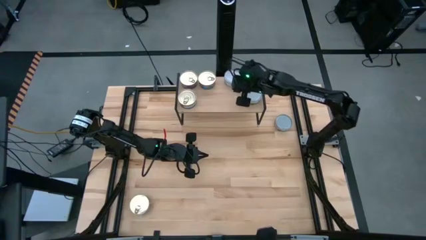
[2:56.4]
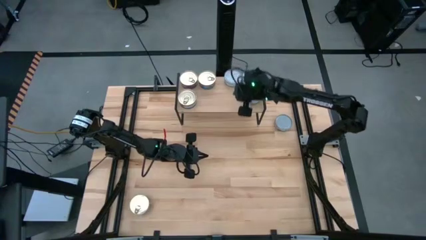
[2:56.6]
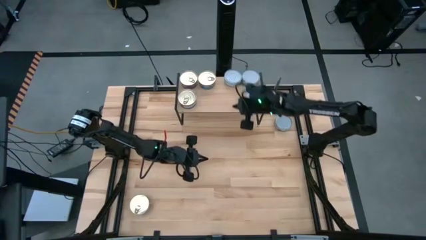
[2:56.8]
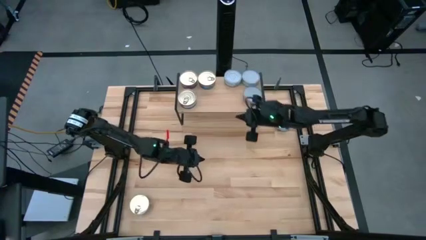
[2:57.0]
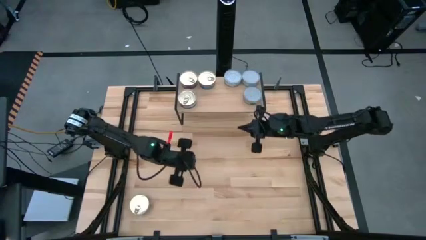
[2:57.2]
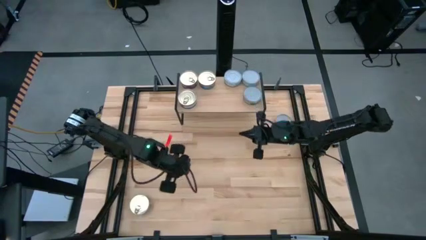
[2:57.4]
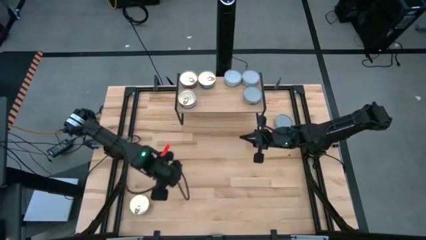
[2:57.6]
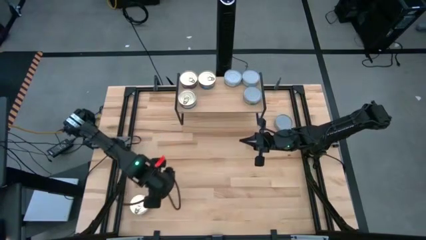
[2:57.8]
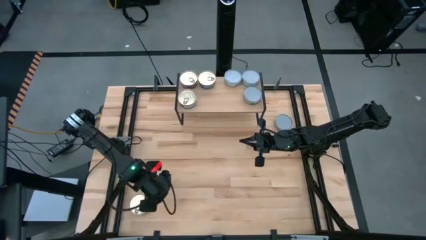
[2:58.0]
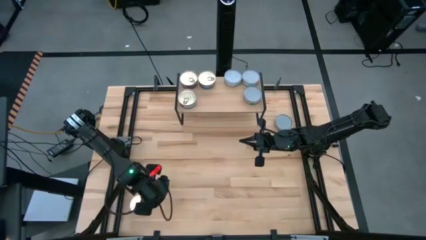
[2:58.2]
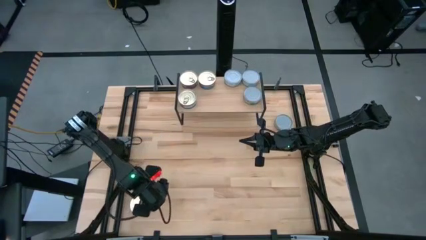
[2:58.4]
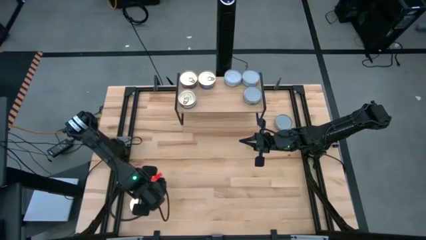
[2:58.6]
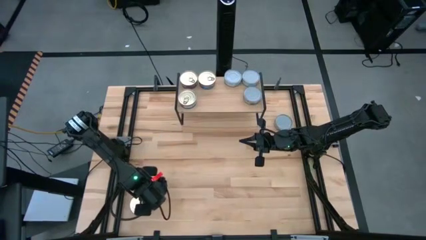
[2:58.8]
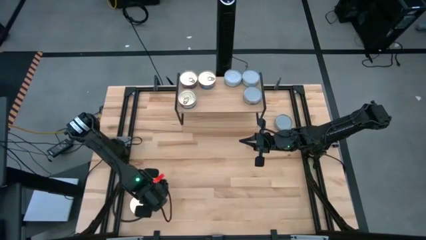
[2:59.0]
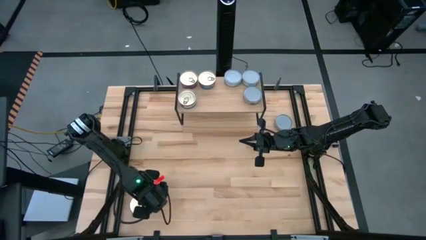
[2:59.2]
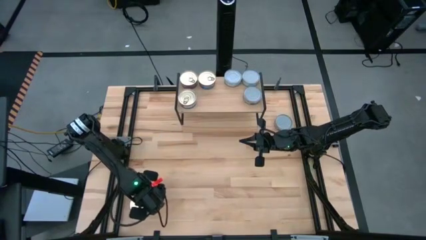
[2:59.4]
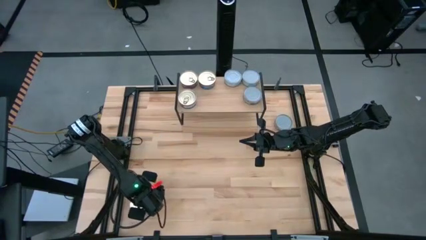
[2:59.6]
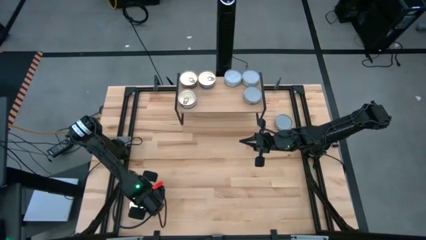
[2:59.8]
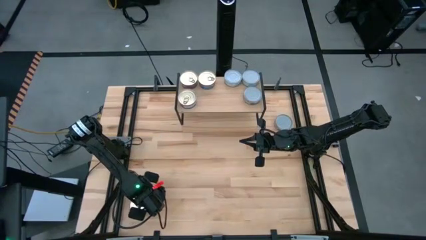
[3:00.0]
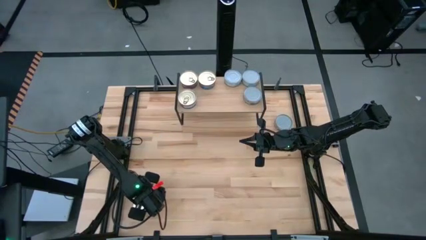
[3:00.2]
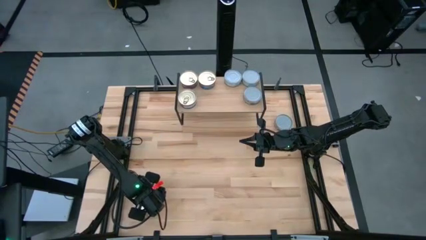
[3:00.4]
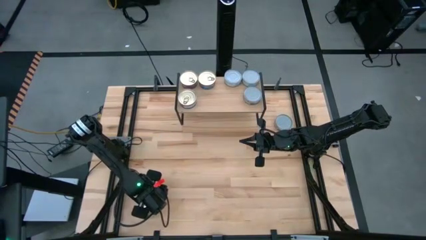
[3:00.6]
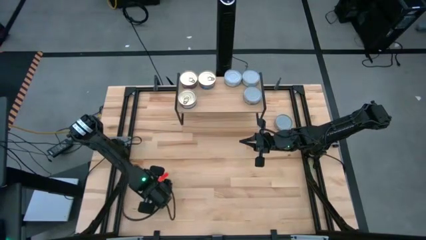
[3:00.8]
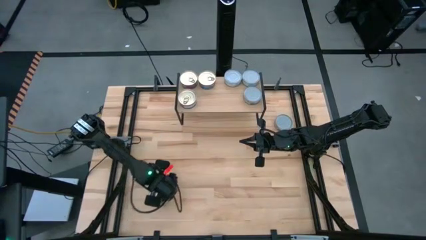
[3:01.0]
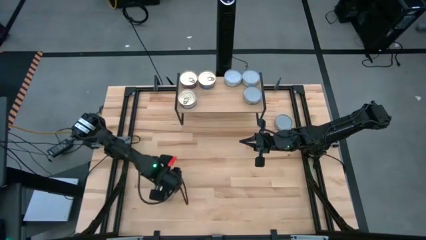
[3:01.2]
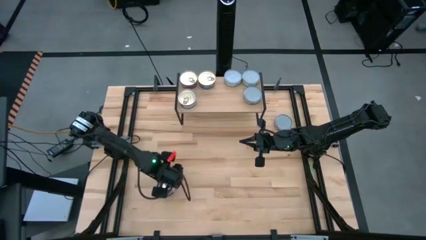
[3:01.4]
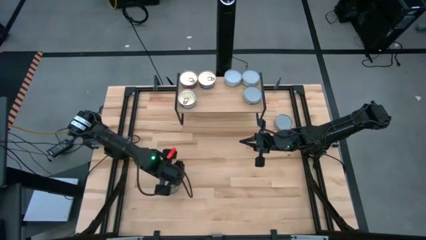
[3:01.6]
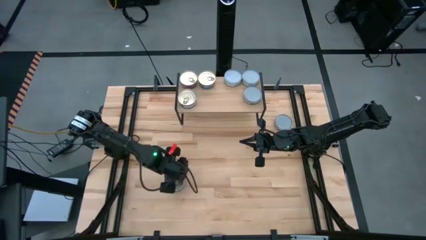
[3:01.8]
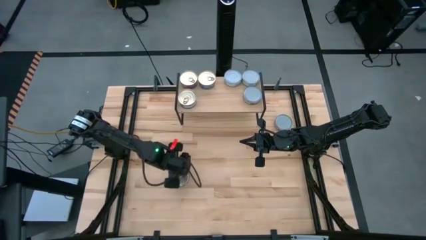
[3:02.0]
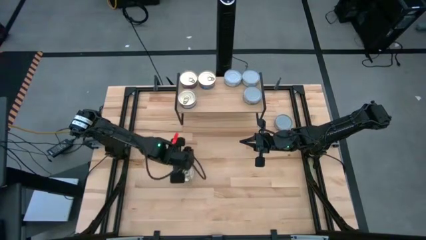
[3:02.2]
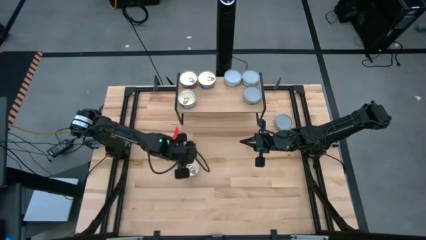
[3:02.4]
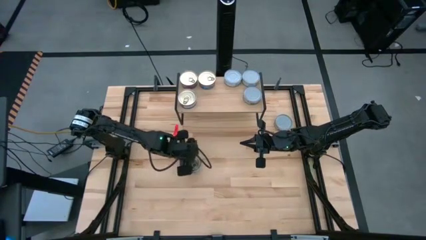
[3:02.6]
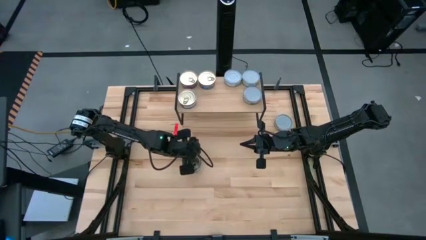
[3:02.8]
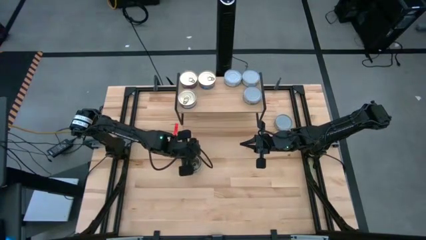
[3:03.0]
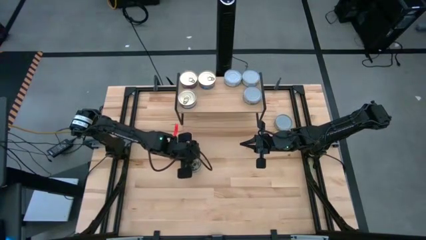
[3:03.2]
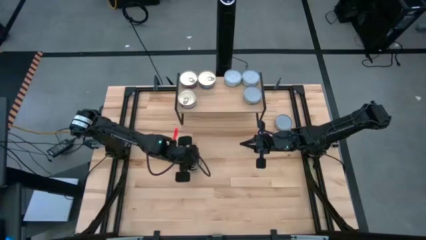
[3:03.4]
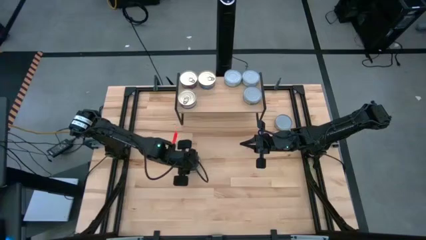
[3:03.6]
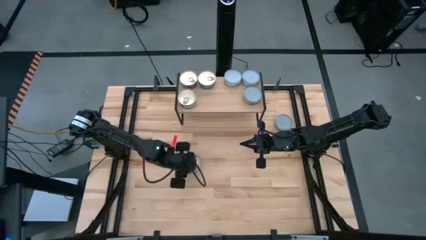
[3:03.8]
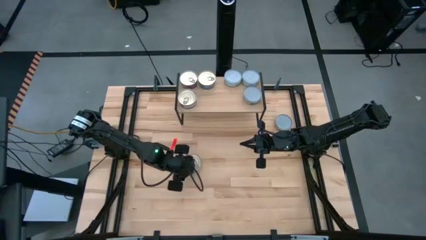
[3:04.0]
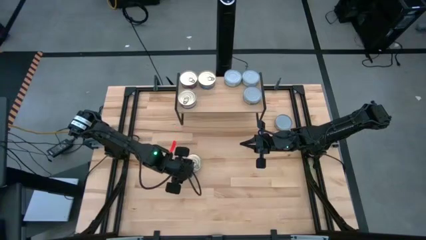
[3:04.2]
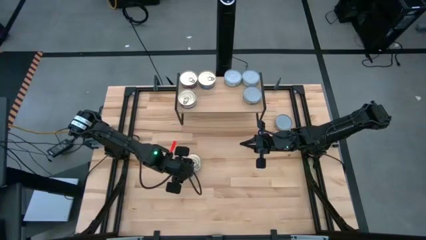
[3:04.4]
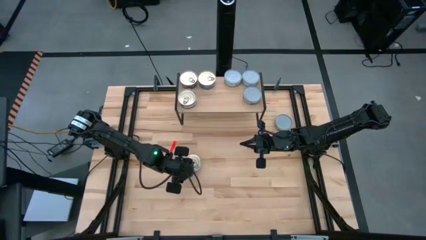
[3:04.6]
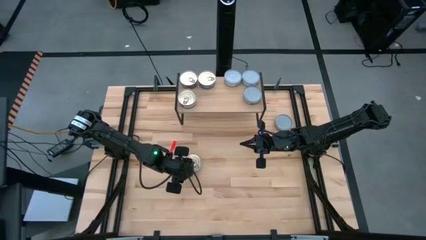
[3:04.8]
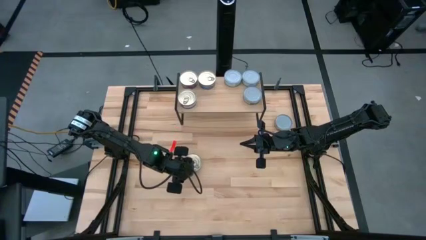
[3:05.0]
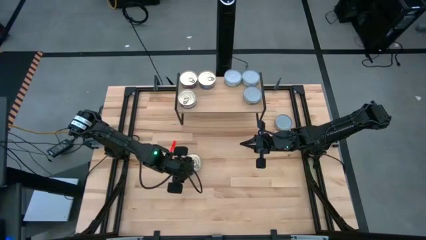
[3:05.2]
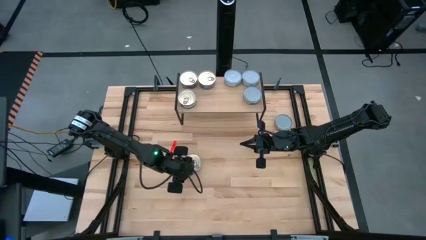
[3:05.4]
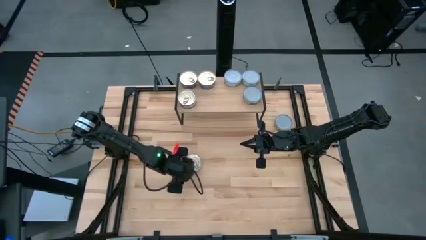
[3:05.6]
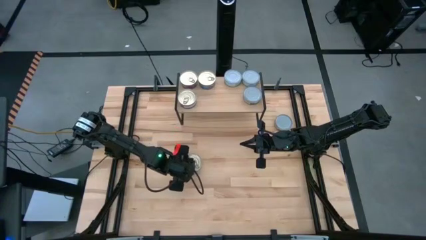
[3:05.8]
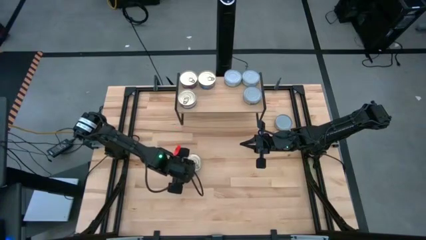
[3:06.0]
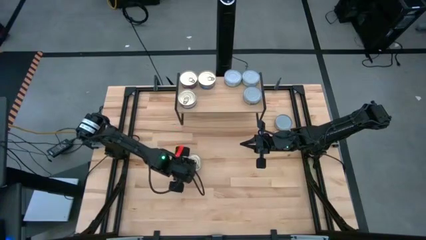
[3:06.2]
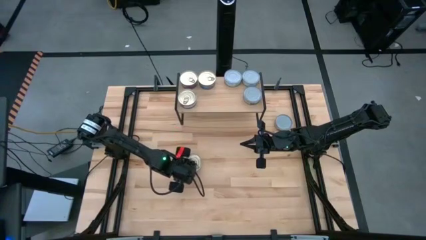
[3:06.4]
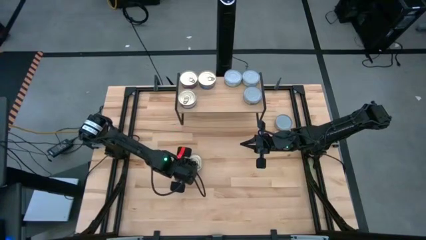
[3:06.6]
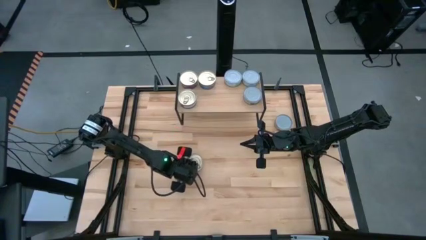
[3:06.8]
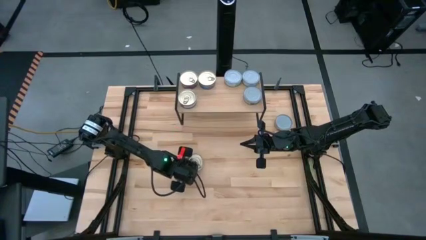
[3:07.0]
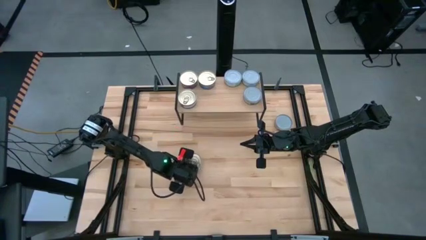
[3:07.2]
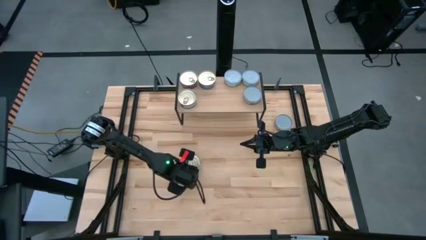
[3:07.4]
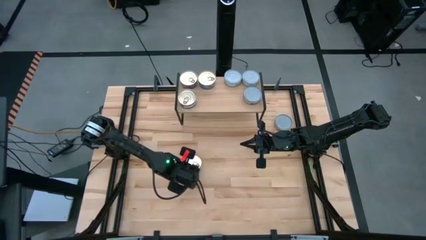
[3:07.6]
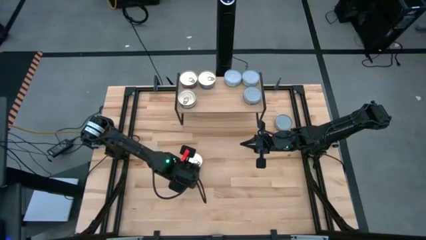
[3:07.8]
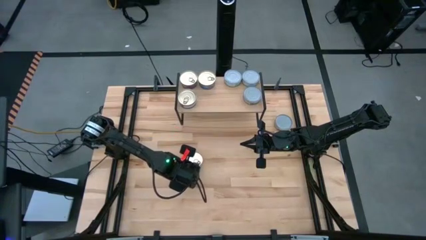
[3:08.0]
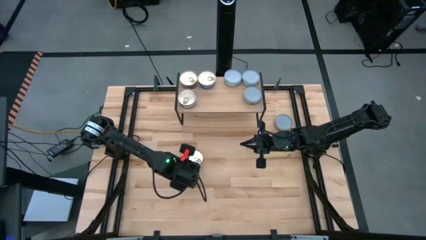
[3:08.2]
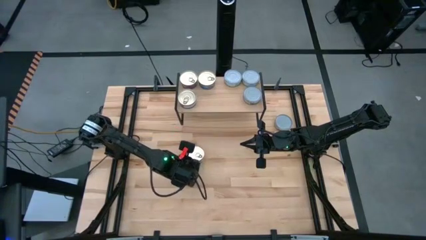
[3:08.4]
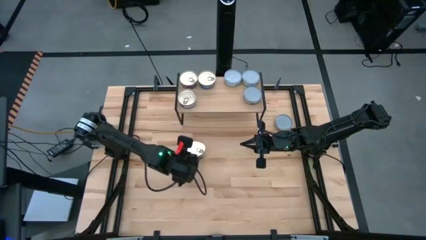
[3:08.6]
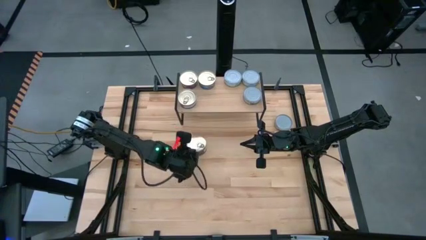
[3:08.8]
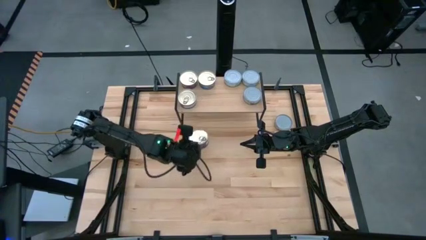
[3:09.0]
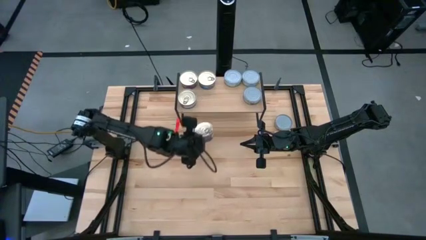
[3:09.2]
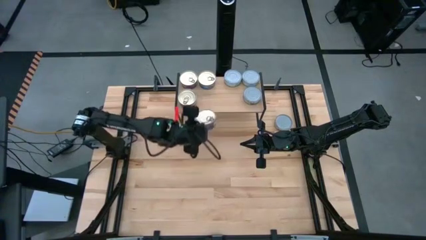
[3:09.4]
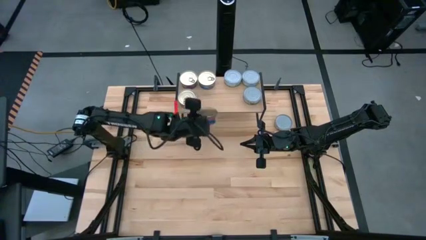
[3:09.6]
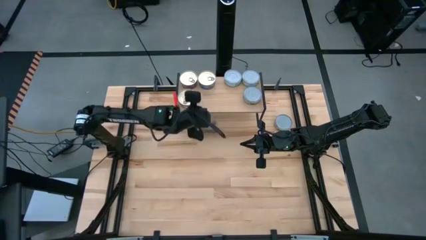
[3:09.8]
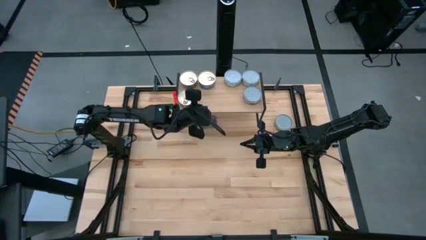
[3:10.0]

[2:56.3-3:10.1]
Task: Stack canned seafood by type on shelf
Put the blue tuna can on the shelf aligned with the other blue tuna can
